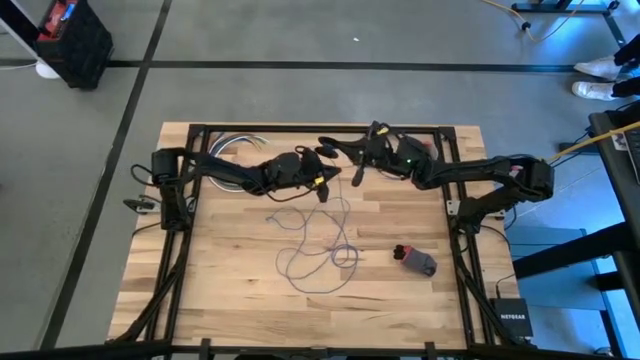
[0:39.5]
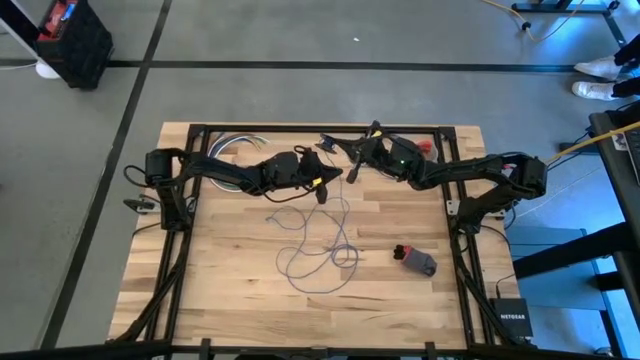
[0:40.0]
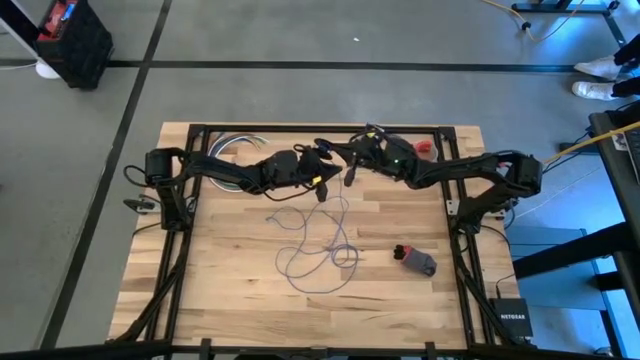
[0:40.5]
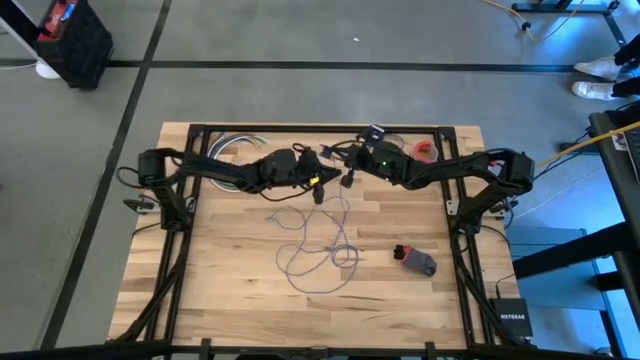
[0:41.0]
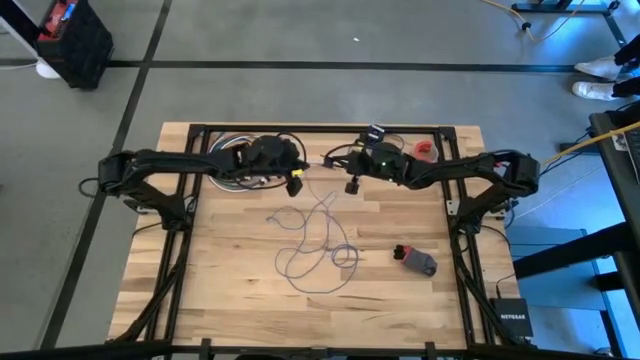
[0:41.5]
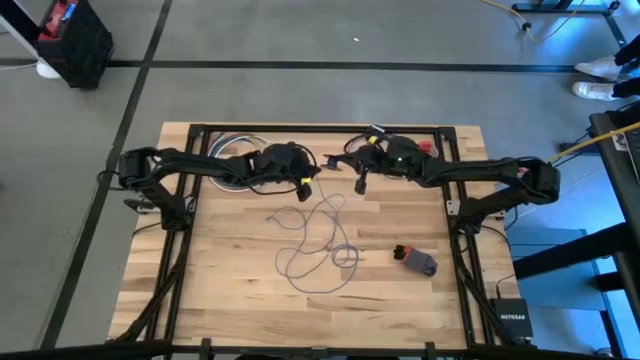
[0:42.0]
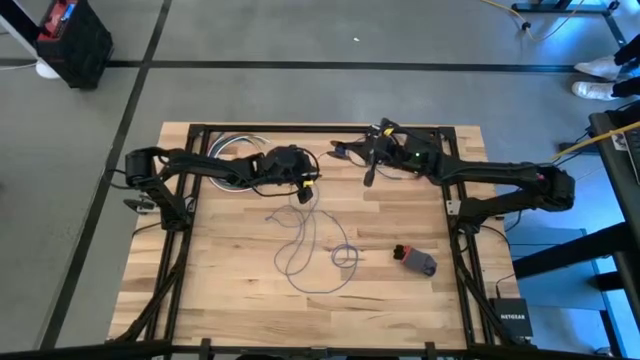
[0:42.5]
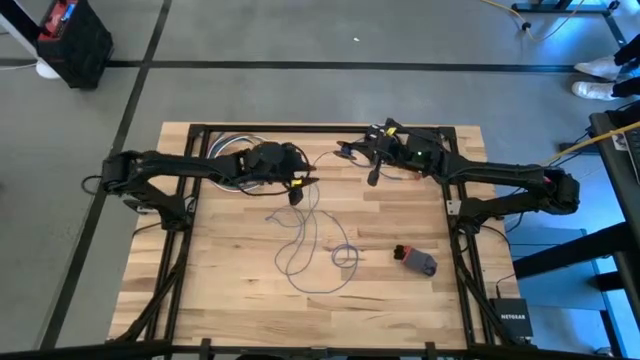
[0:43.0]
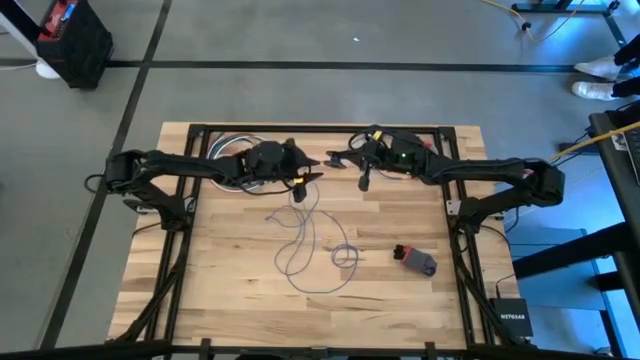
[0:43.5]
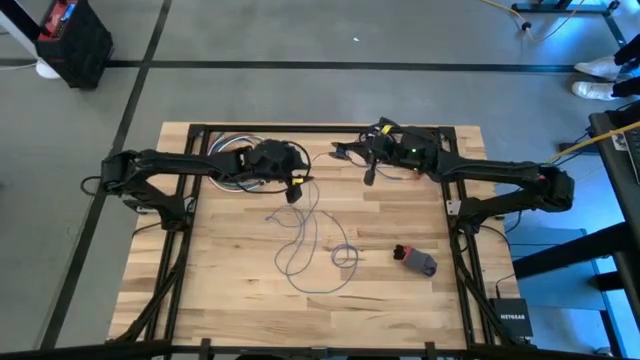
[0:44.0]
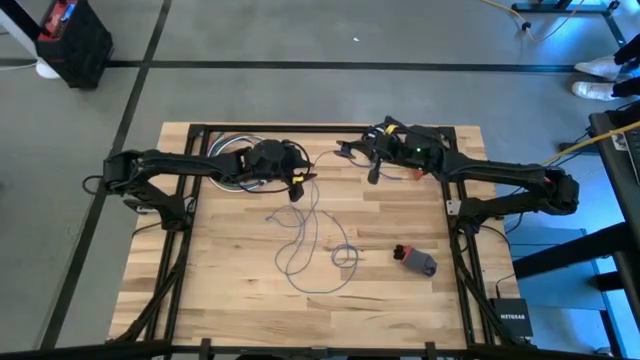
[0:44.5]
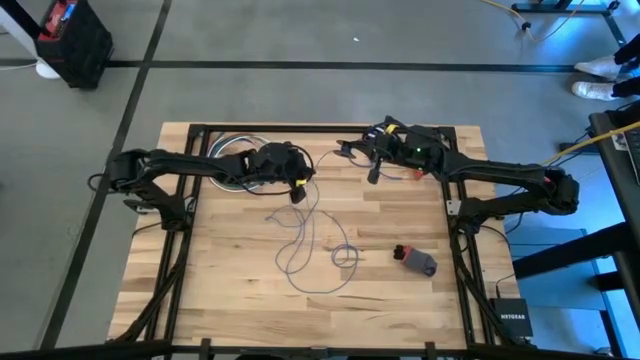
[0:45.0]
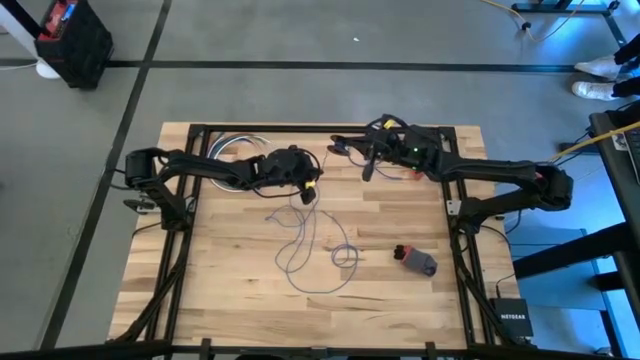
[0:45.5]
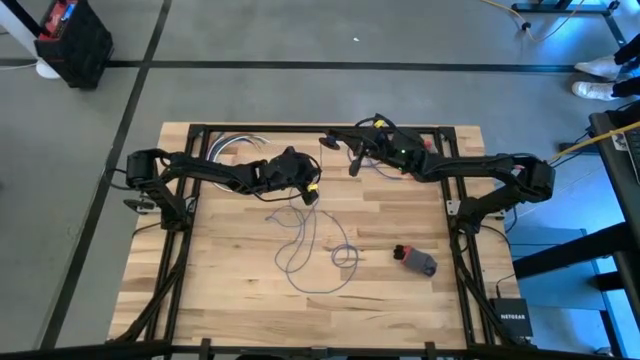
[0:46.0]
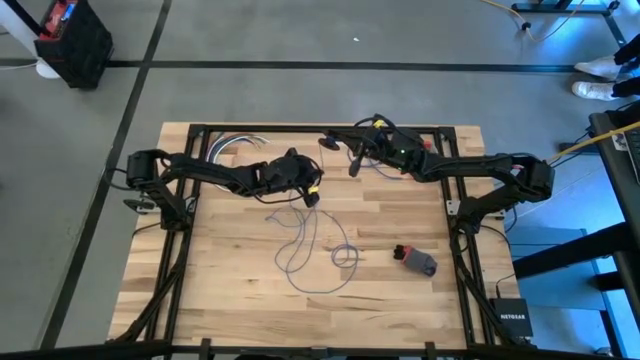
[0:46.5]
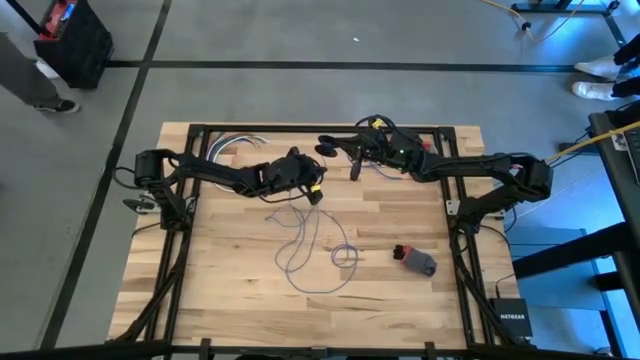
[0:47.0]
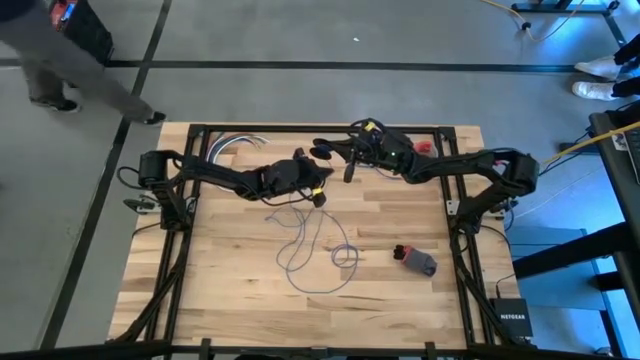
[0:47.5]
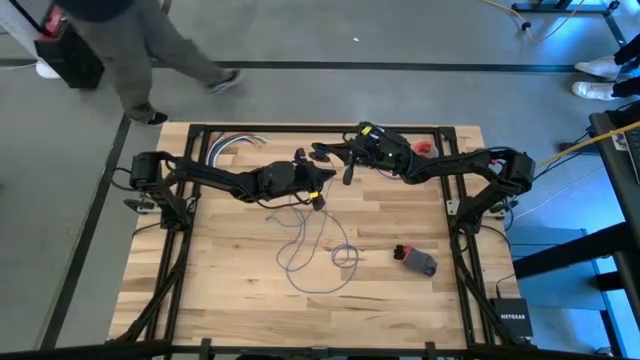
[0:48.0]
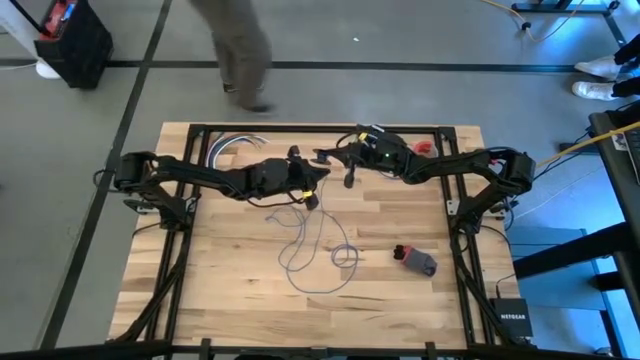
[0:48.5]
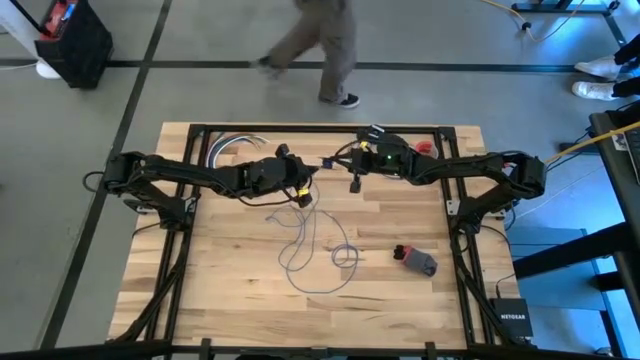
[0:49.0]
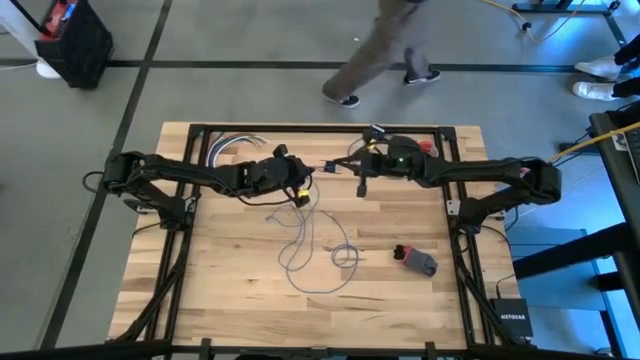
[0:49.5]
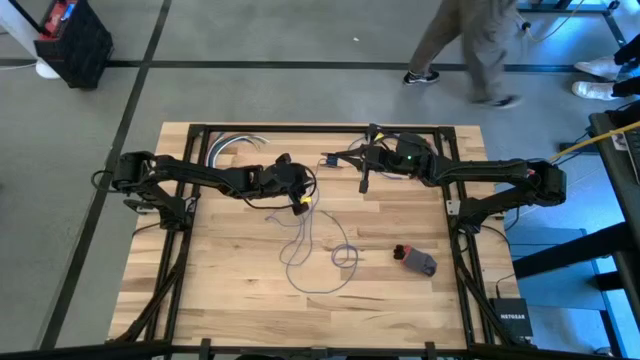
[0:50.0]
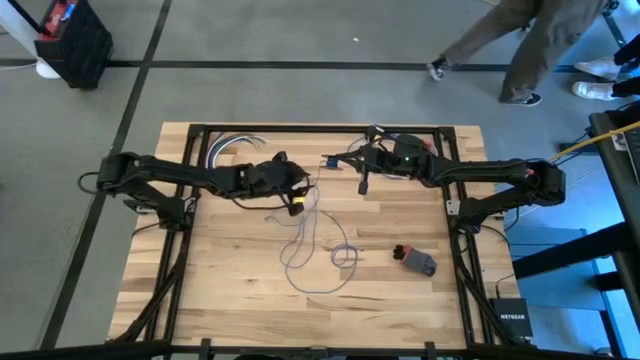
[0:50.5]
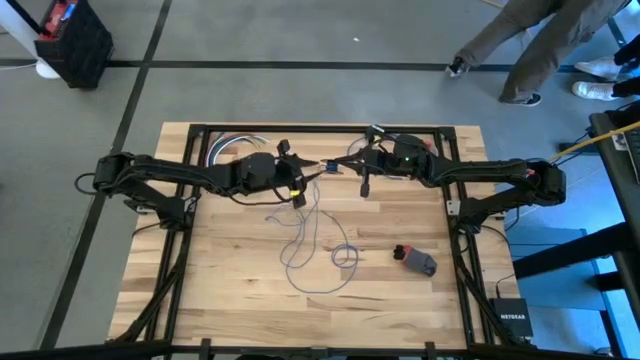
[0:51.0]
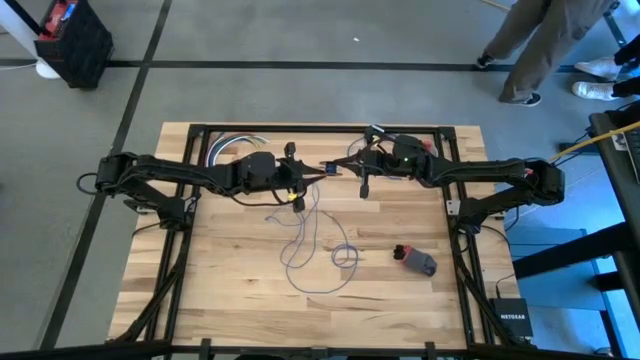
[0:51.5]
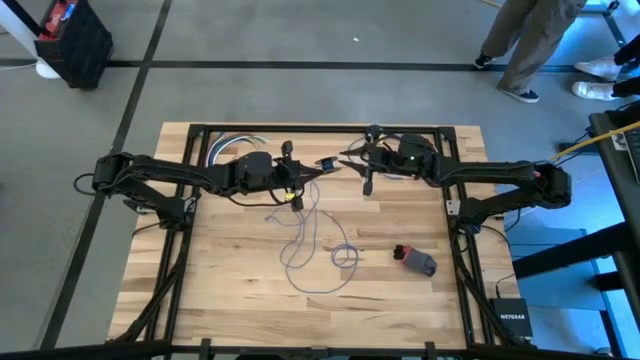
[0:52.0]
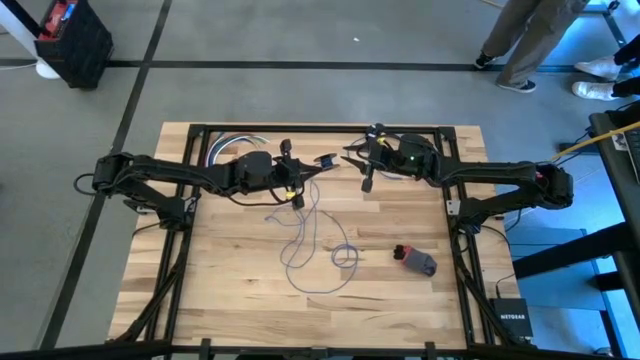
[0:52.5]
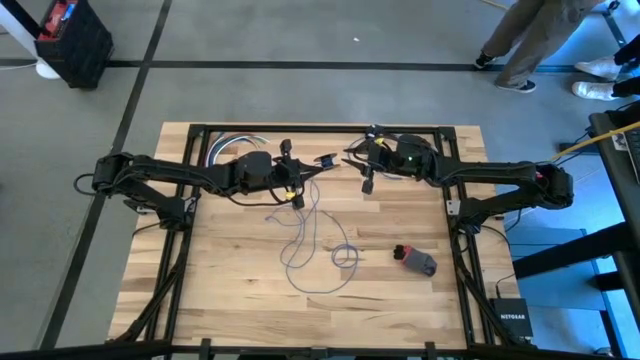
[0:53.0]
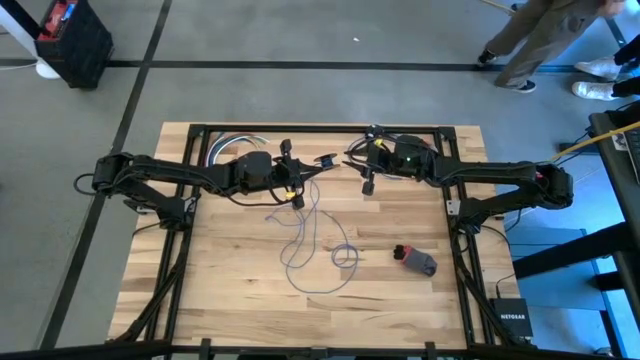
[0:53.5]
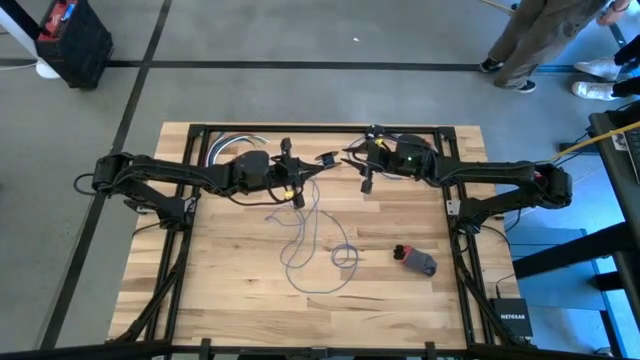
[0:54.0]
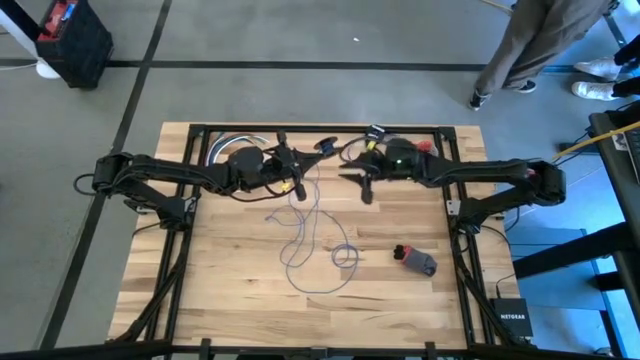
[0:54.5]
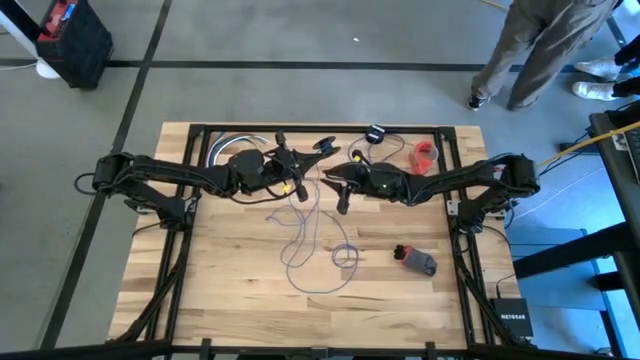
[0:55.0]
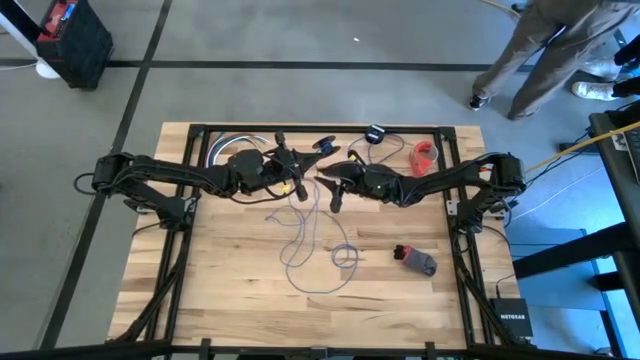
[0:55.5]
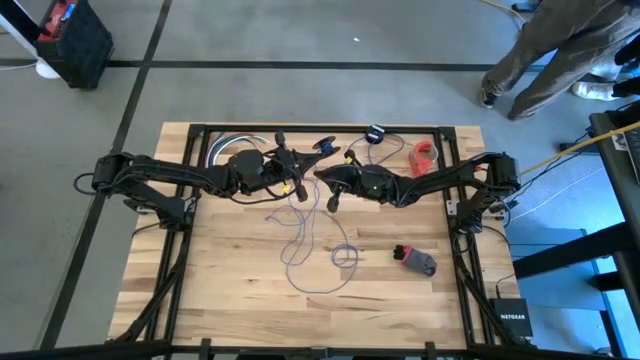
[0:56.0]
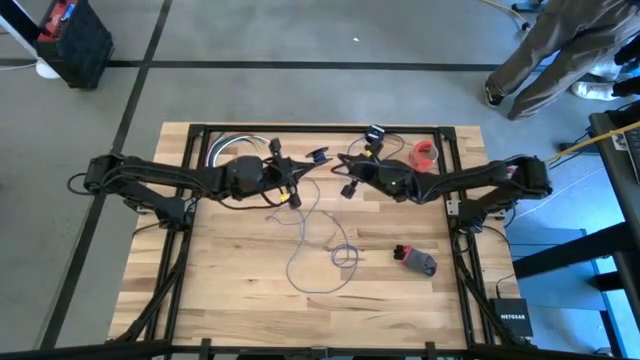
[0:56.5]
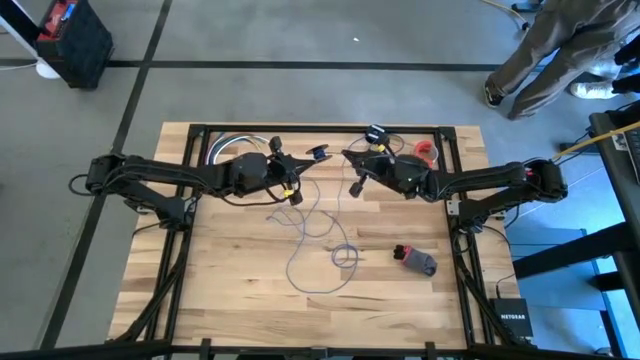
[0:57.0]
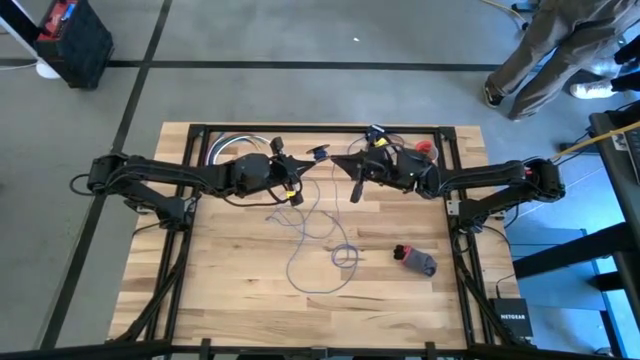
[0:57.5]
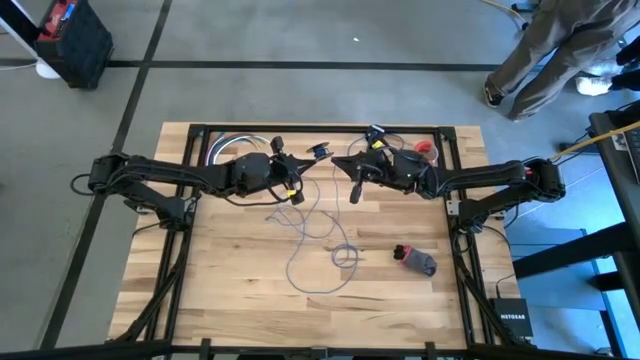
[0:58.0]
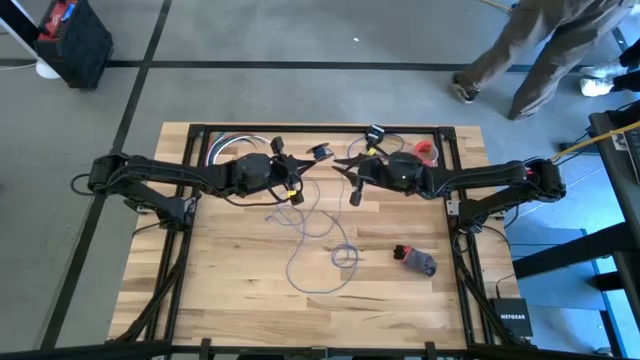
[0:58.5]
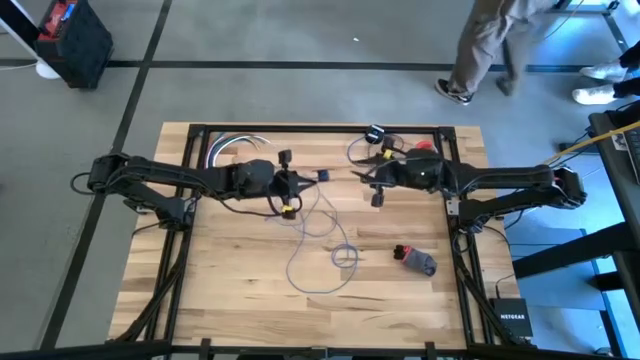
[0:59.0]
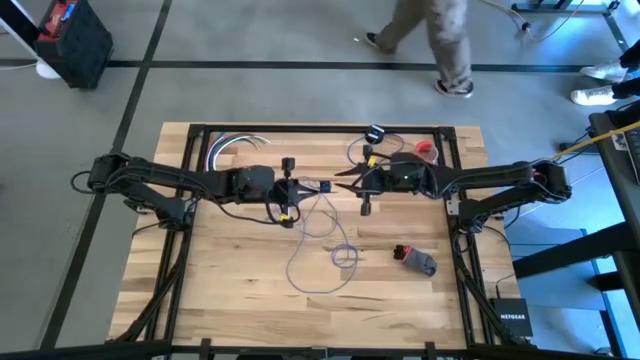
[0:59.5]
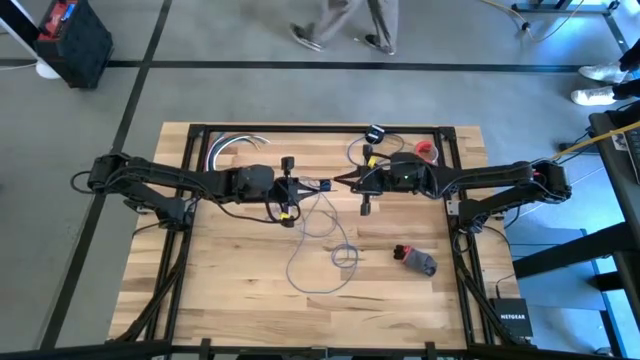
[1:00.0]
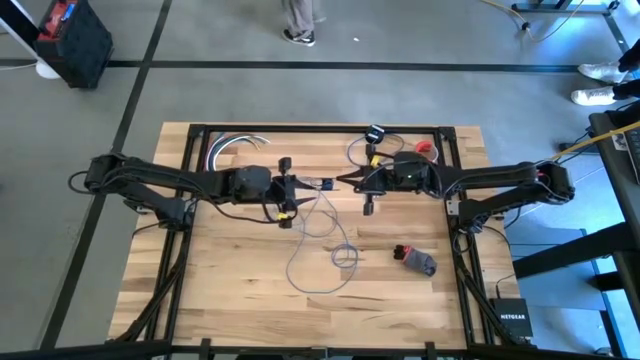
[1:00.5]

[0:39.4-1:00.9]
Task: Coil cords
Coil the blue wire onto the spool
